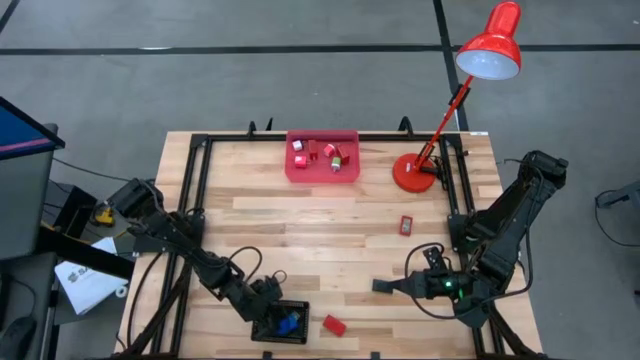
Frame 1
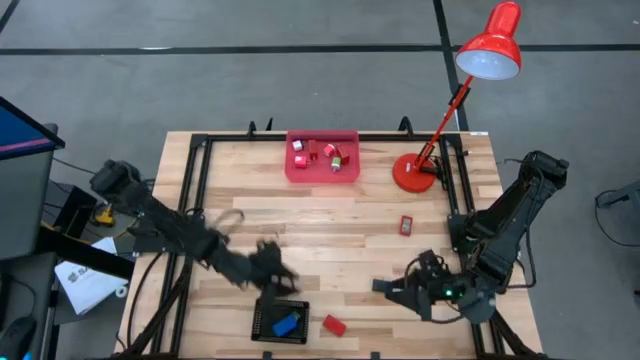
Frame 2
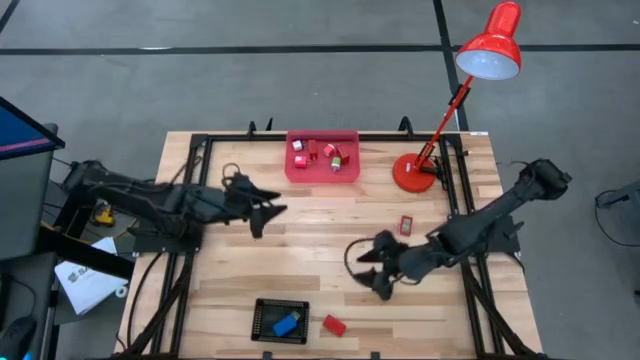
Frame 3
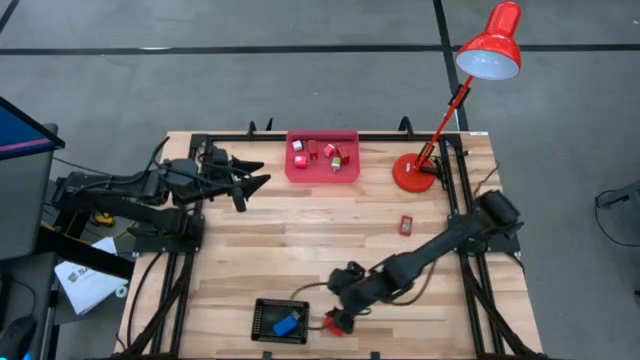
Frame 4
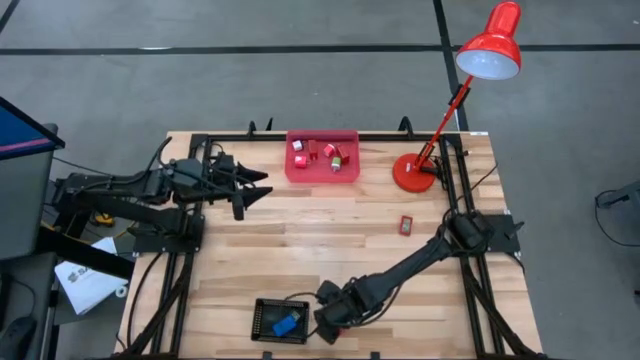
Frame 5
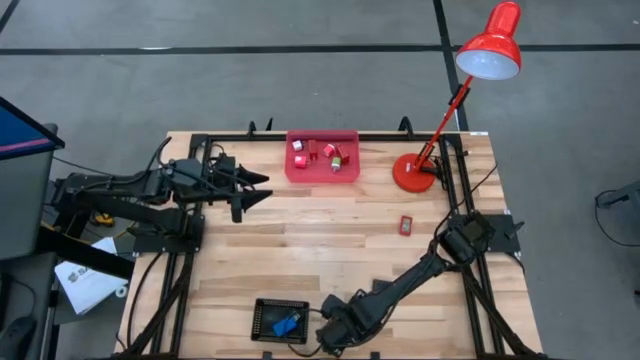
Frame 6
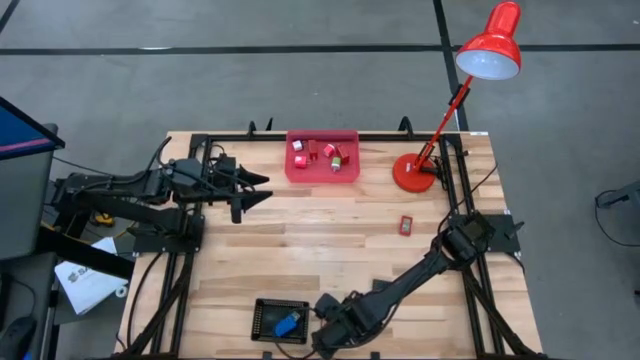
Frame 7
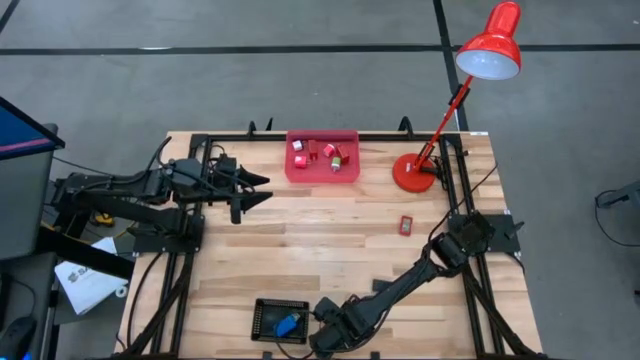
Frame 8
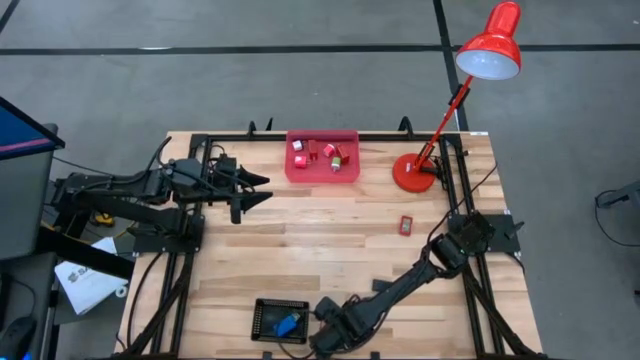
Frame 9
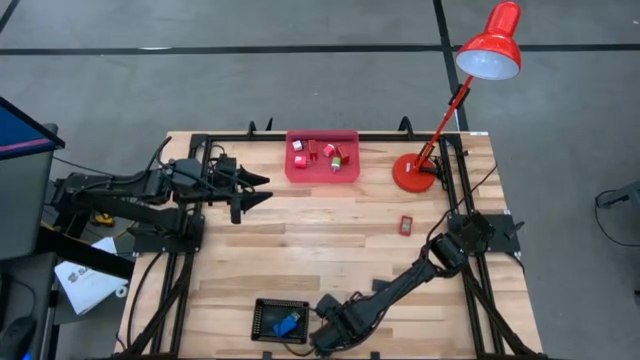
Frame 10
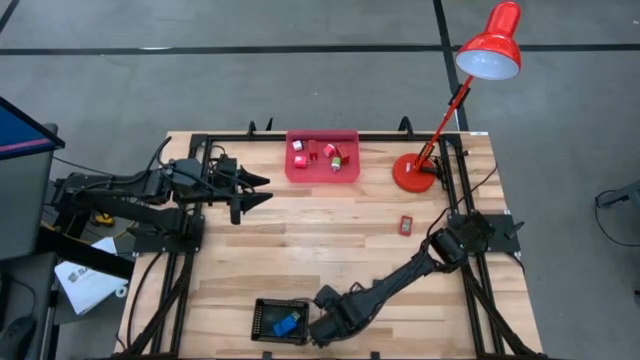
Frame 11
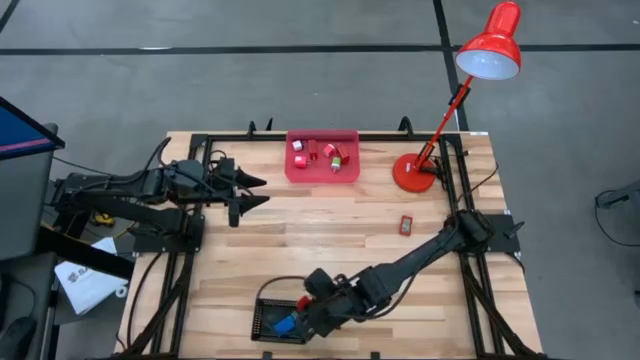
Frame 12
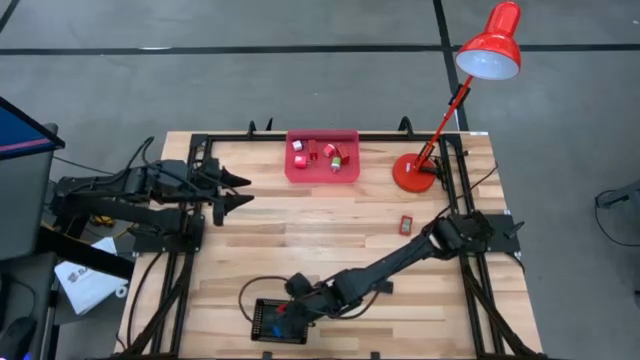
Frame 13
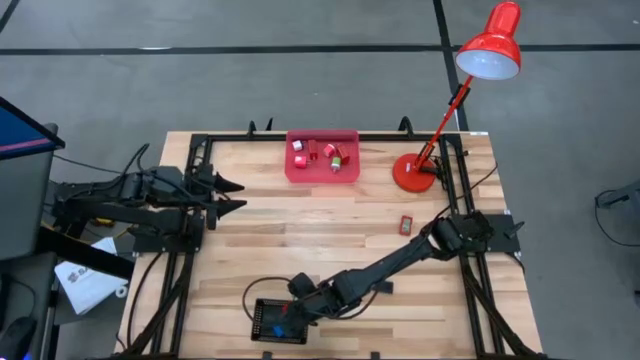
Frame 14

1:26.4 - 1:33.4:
Task: Pick & Place Office items
Put the bottom red digital timer into the black bin

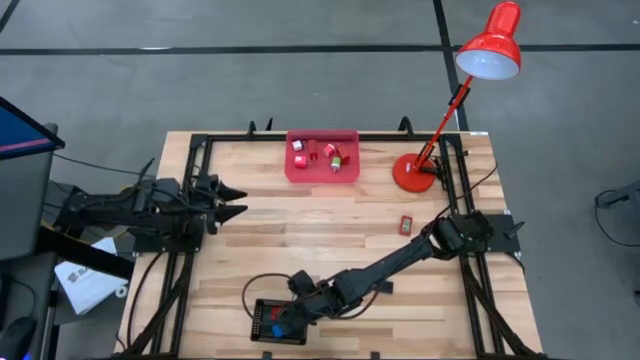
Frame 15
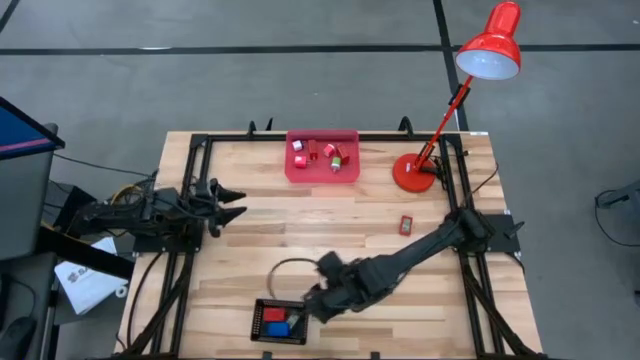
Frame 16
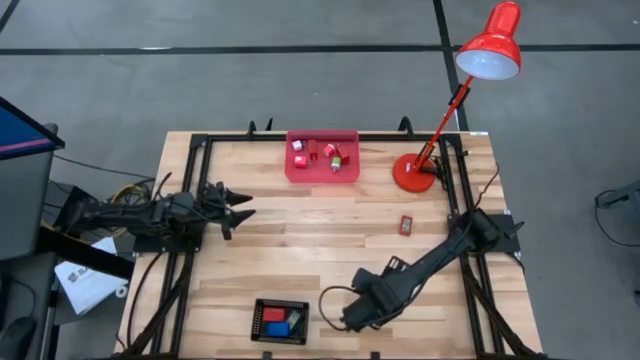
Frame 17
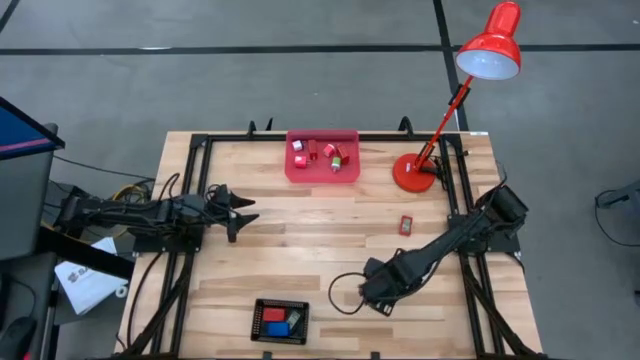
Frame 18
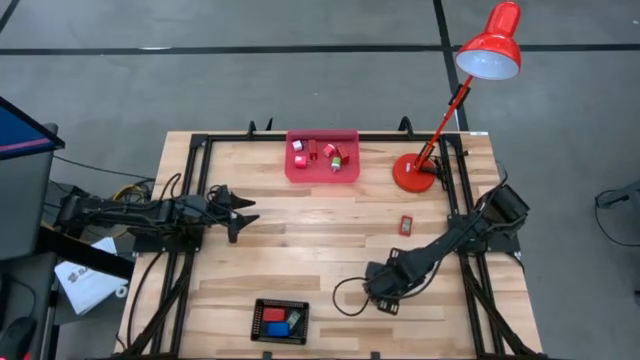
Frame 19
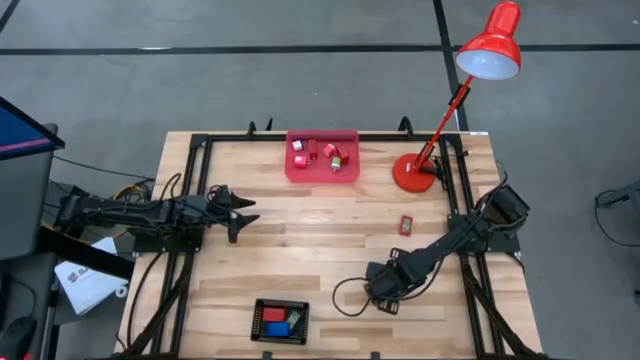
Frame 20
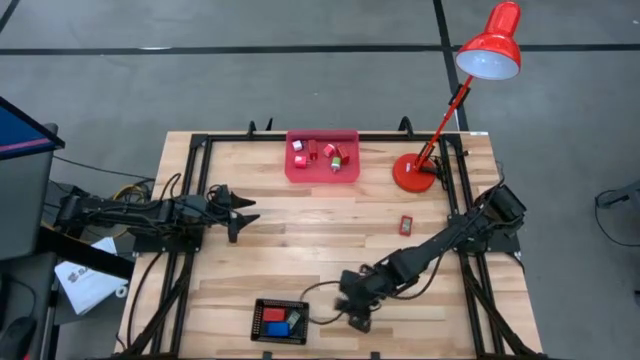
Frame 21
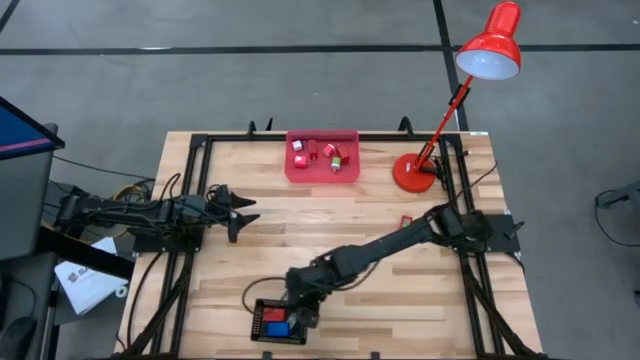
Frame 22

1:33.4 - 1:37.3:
Put the black digital timer into the black bin

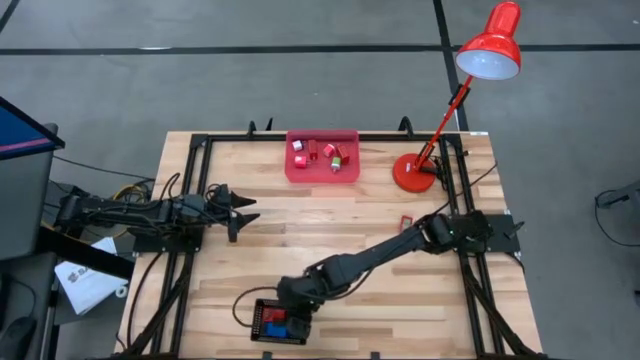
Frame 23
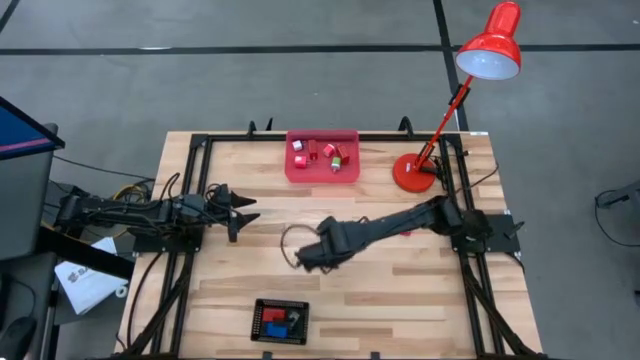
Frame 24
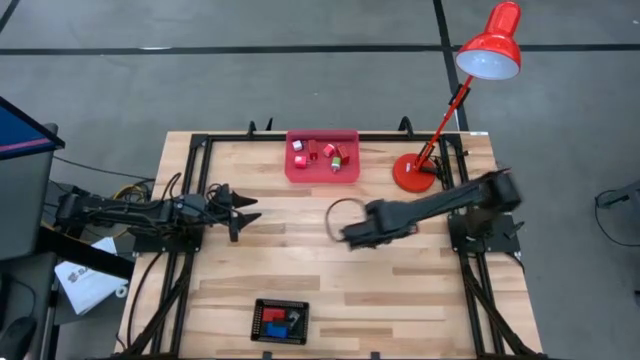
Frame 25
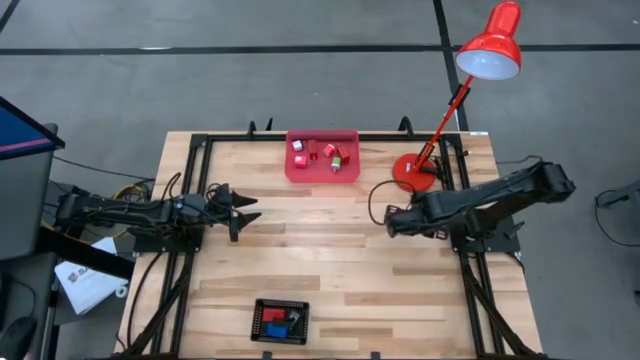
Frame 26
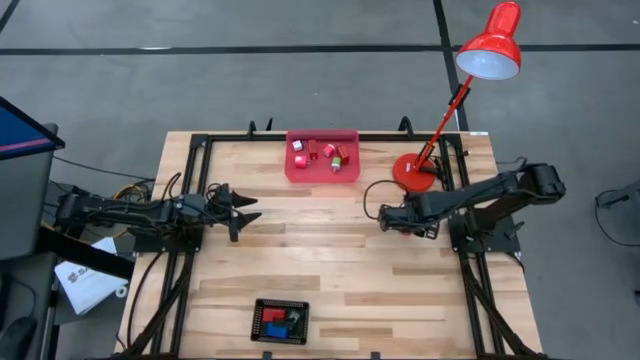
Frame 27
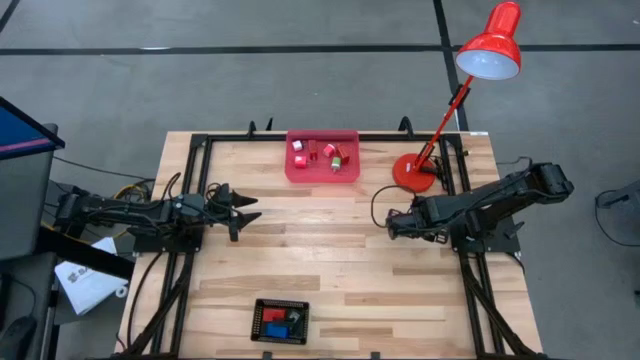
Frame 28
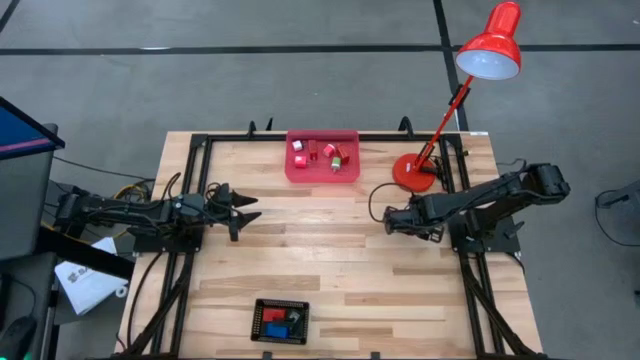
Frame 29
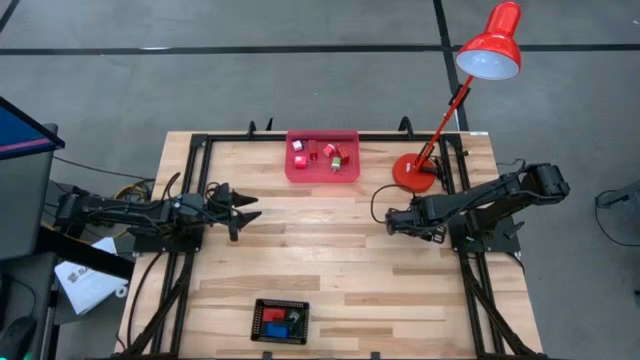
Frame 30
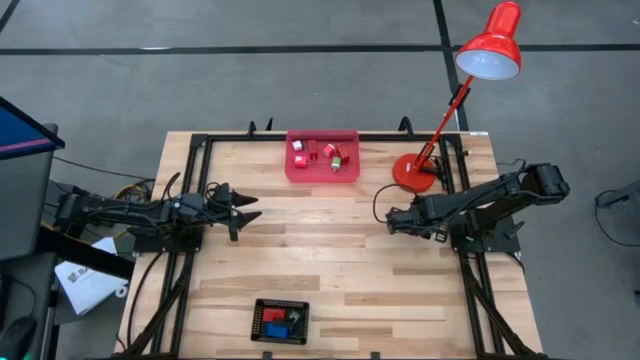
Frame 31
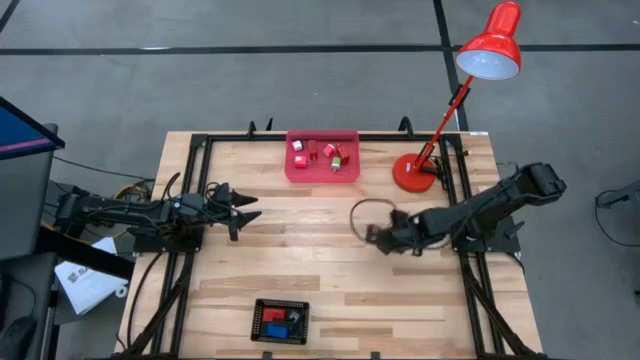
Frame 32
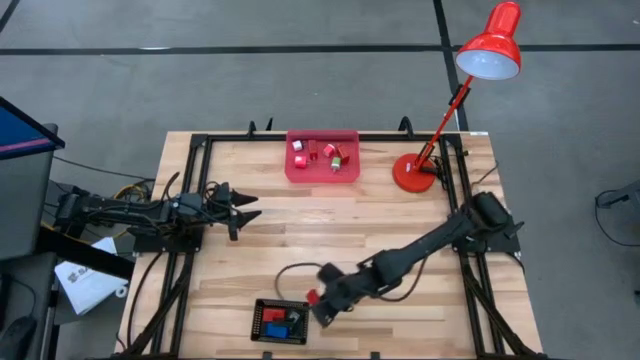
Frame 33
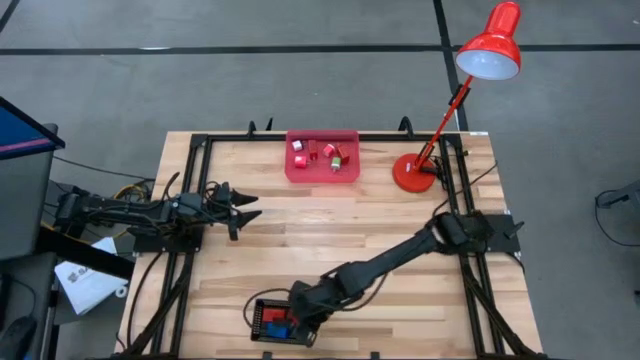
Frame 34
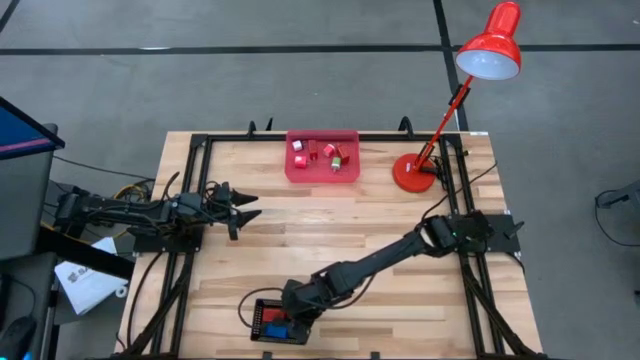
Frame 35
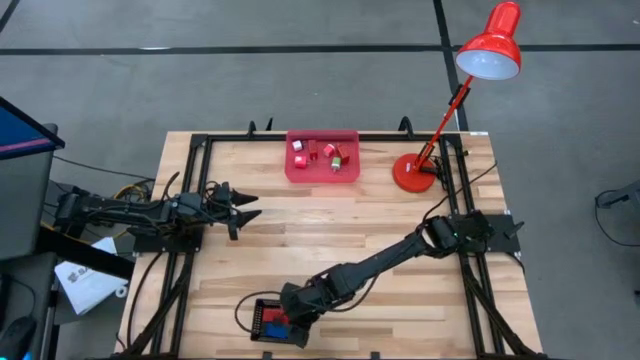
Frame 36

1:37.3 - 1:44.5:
Put the red digital timer into the black bin

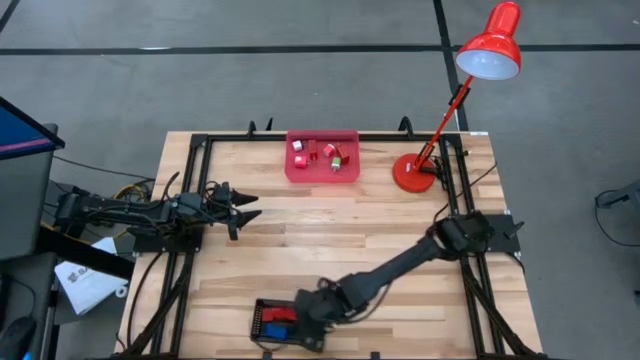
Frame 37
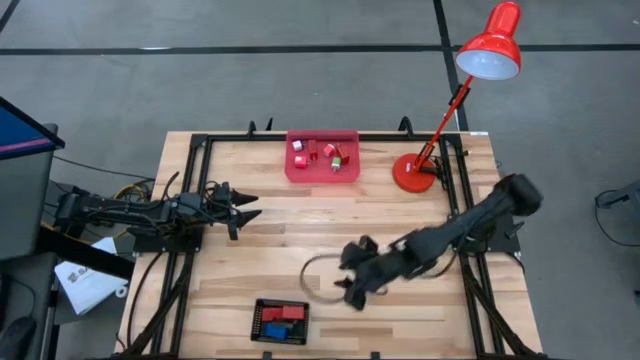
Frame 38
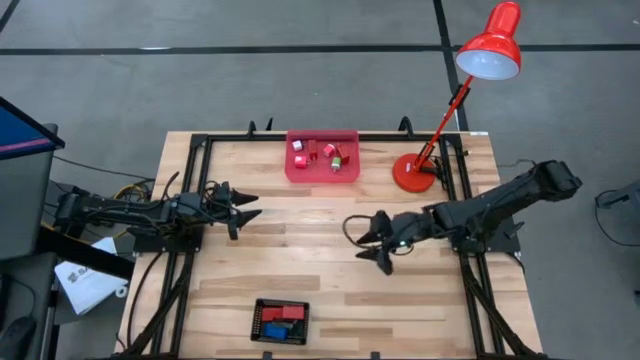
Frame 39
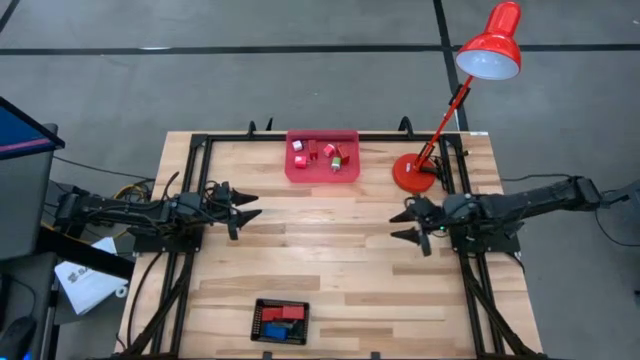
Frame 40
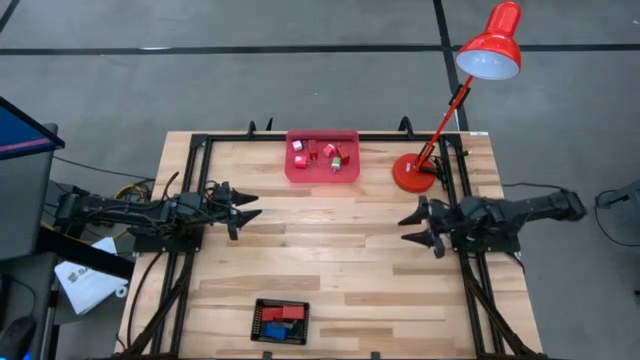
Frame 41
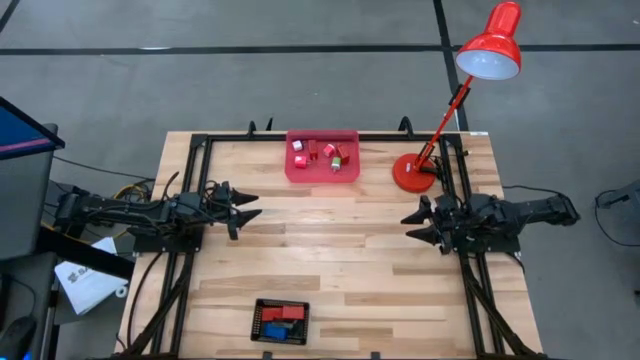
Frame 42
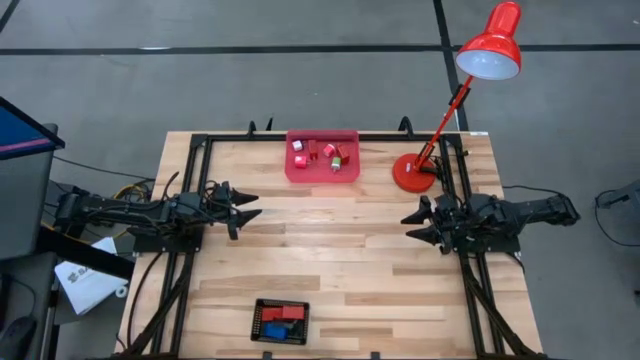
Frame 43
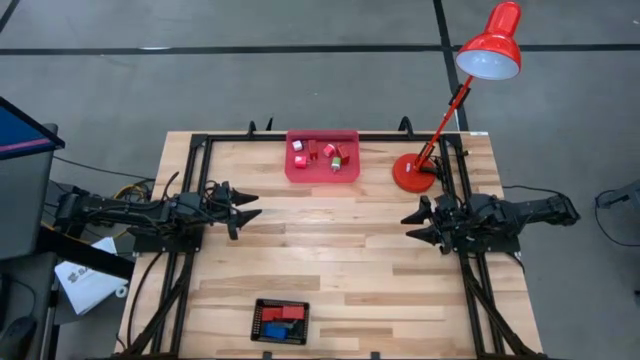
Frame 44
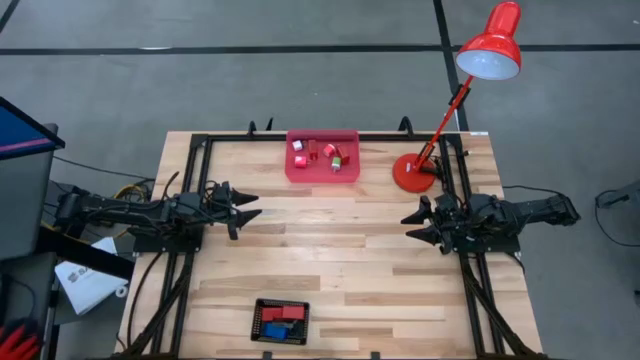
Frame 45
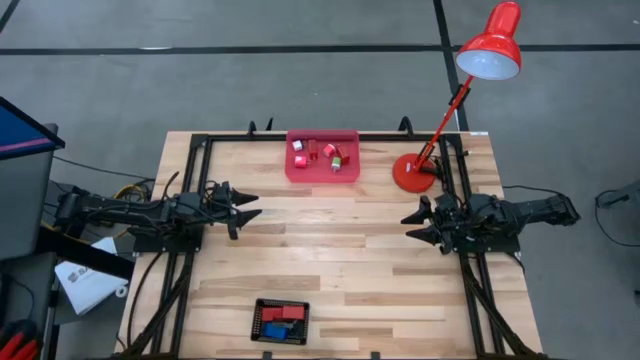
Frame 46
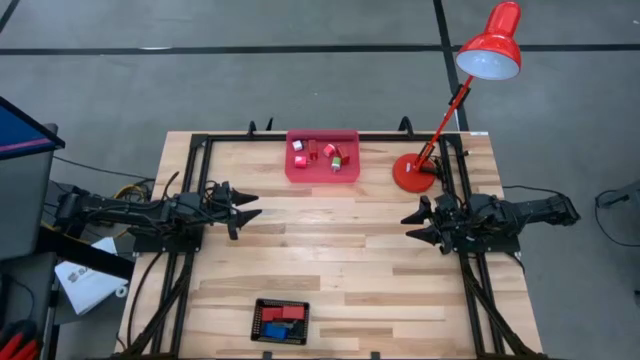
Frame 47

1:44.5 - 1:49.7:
Return to Home Position
